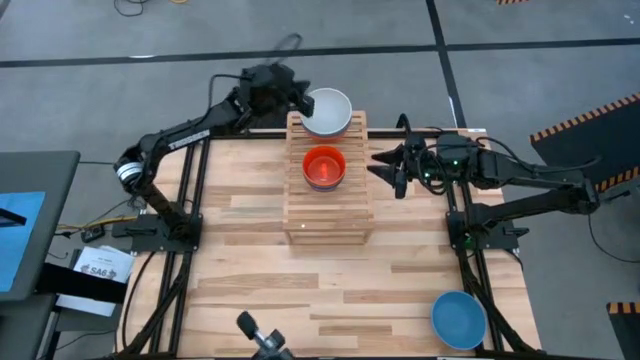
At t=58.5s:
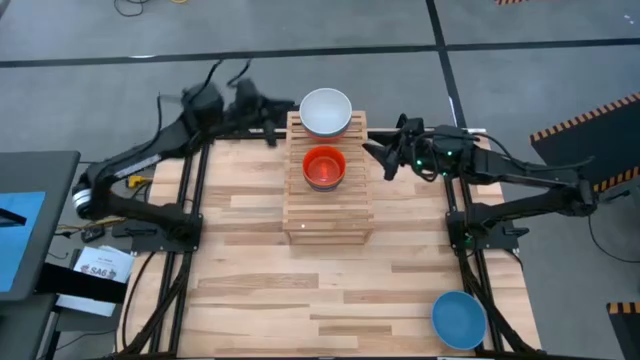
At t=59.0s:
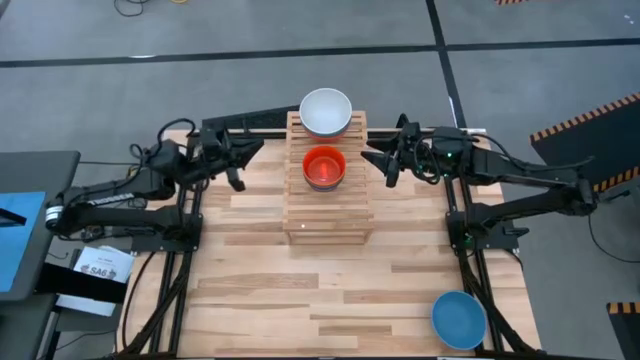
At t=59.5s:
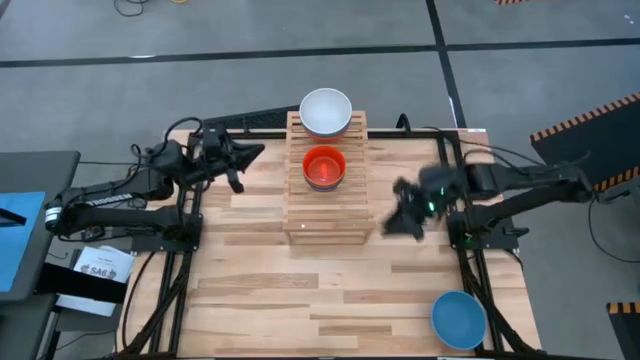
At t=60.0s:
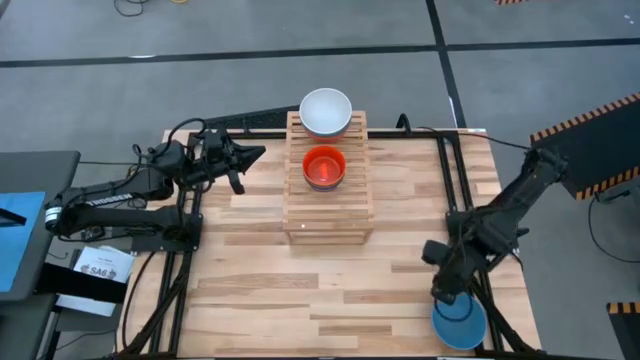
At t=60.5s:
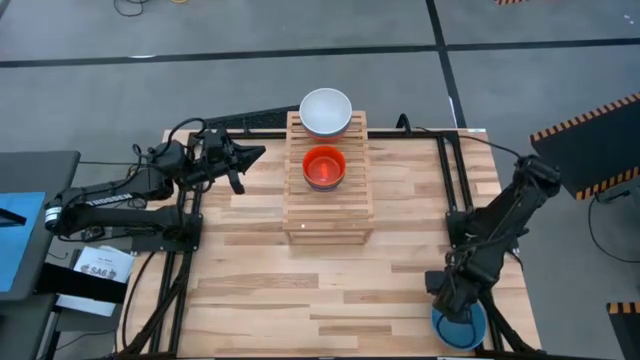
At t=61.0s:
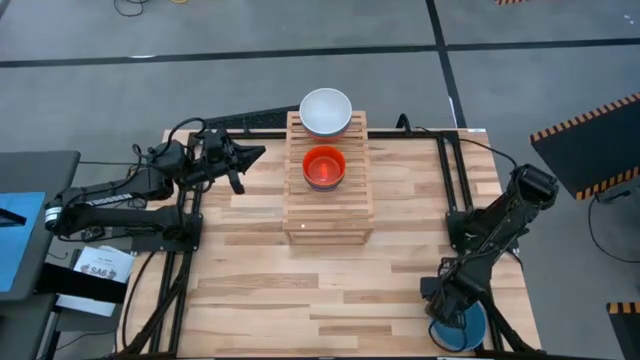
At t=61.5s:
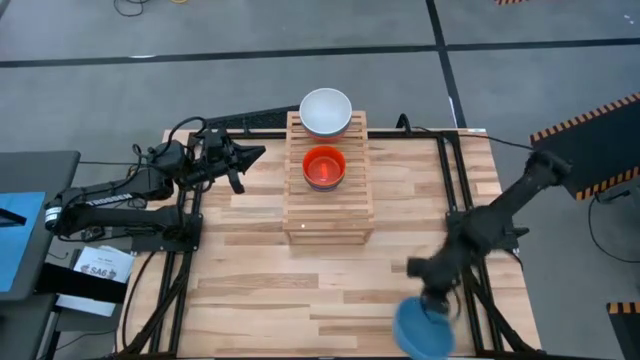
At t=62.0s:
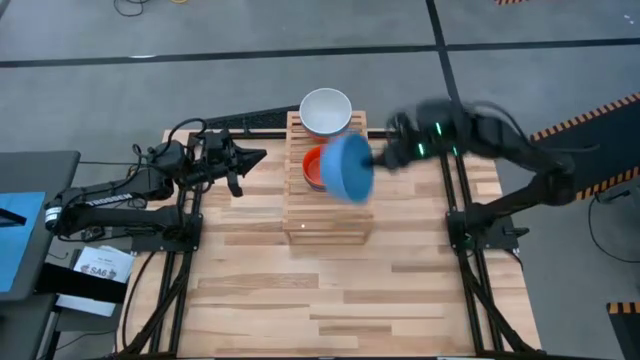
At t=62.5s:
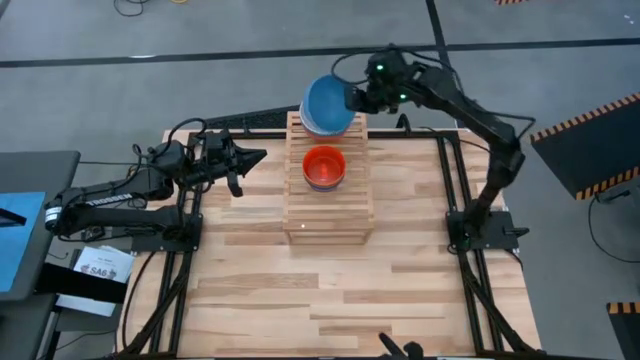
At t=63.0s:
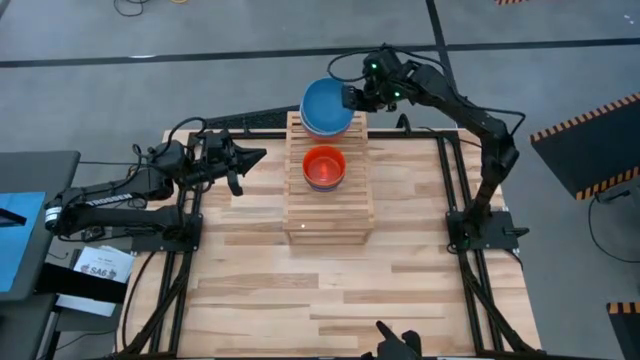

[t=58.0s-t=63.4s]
Task: Place and stack bowls onto a shelf
Stack the big blue bowl on top of the big white bowl on the shelf

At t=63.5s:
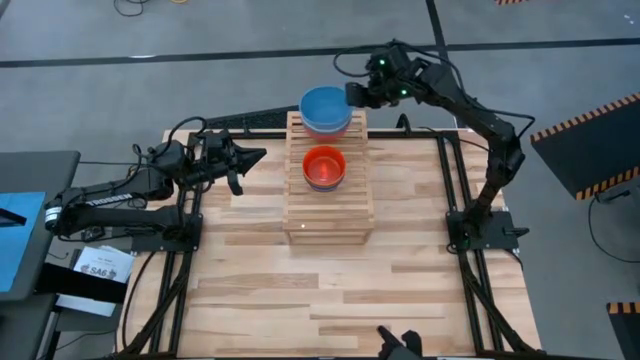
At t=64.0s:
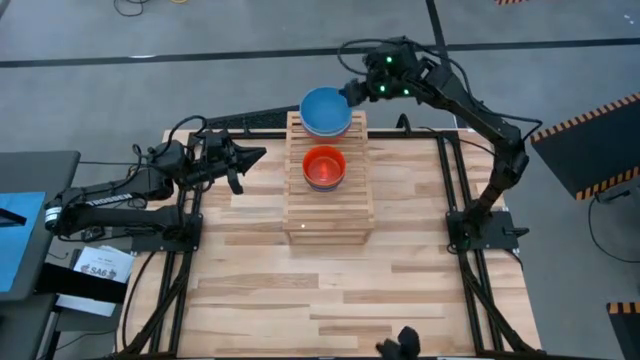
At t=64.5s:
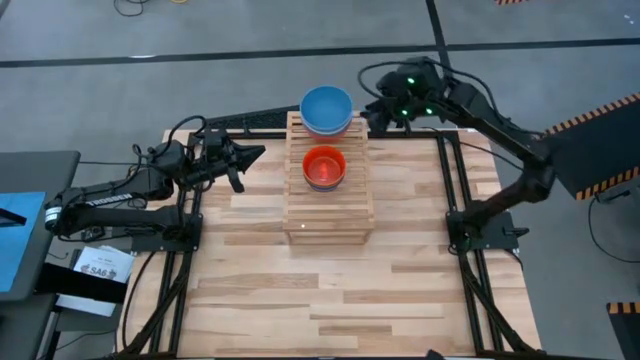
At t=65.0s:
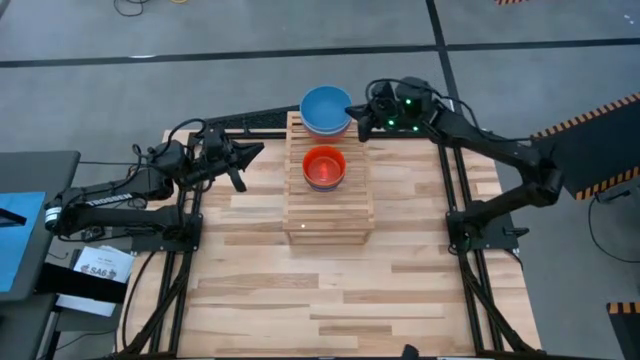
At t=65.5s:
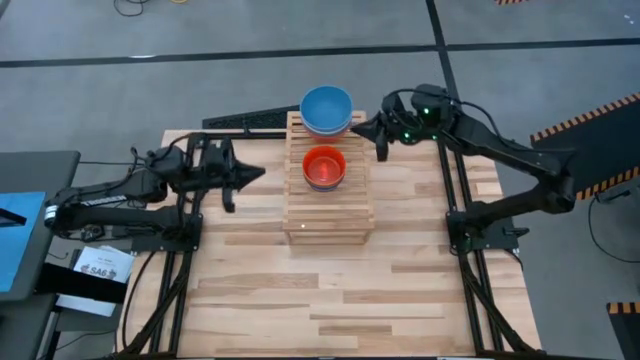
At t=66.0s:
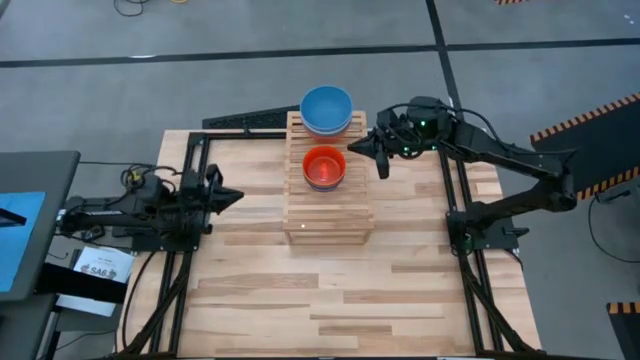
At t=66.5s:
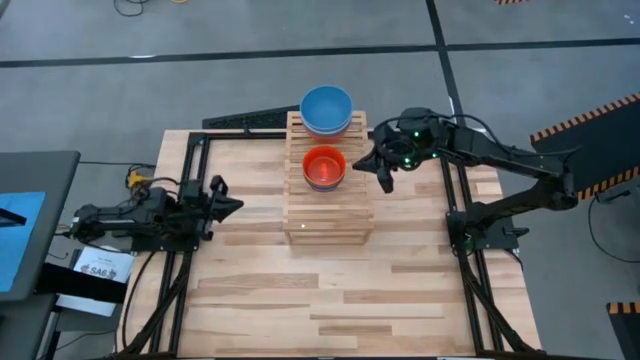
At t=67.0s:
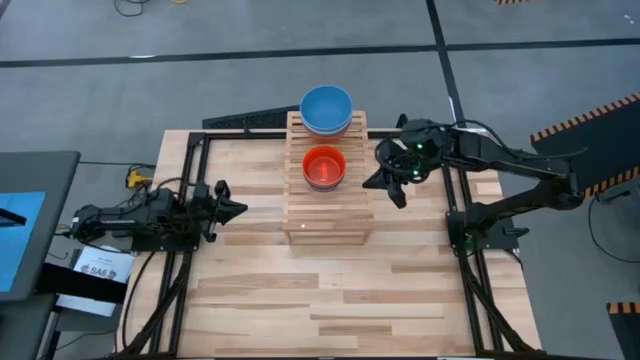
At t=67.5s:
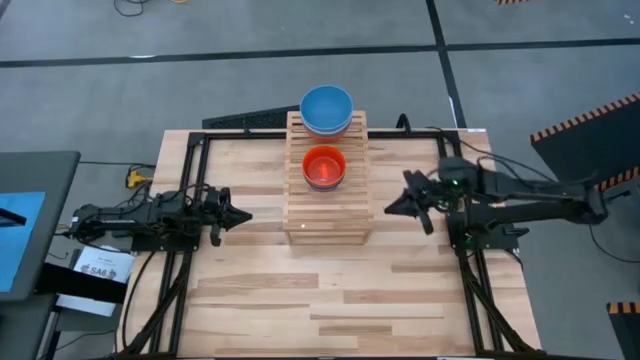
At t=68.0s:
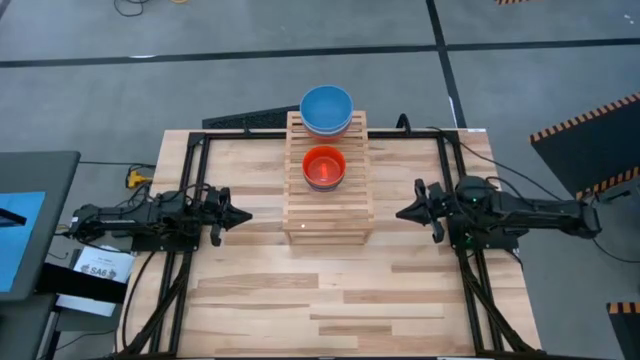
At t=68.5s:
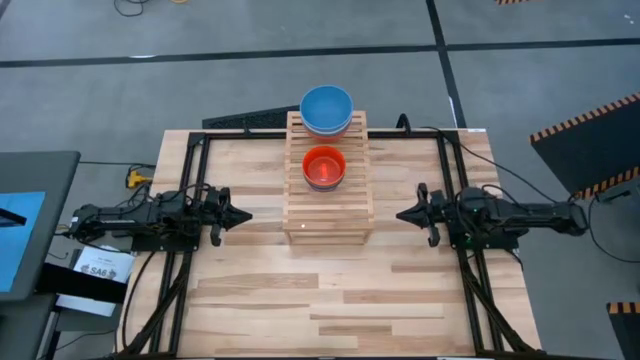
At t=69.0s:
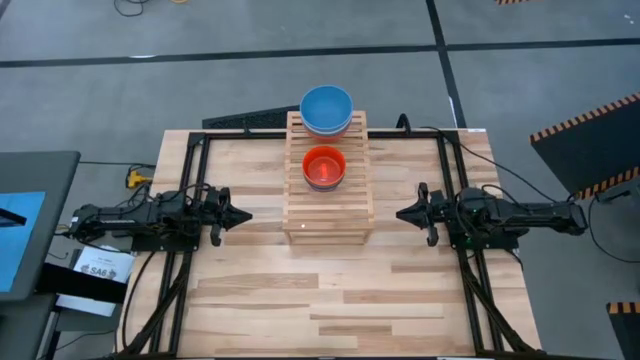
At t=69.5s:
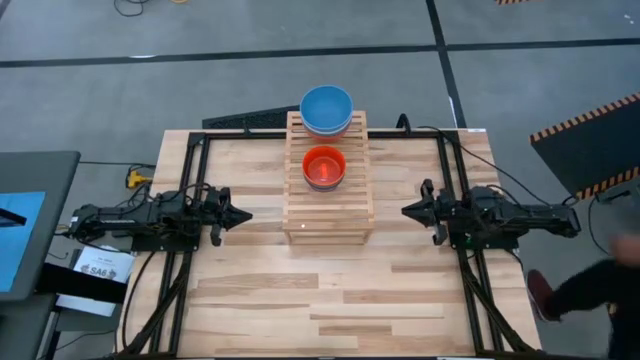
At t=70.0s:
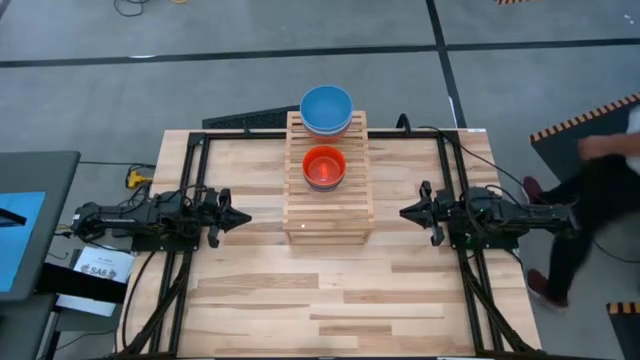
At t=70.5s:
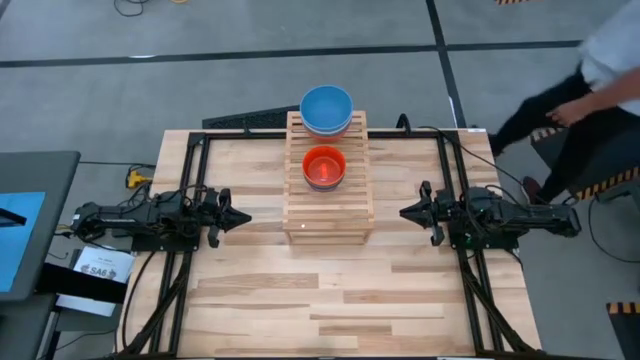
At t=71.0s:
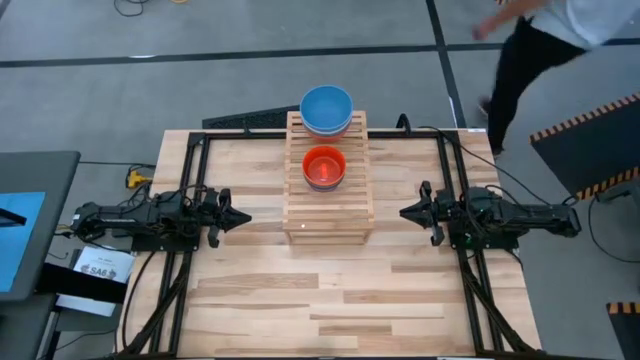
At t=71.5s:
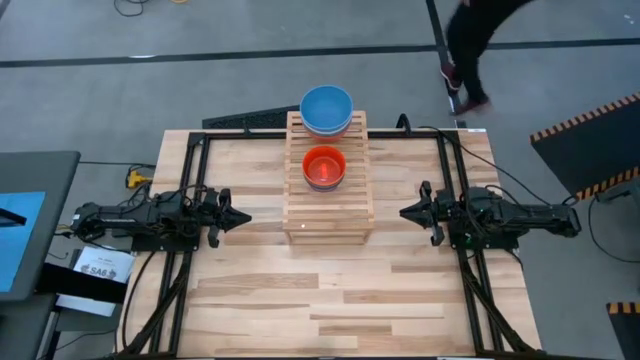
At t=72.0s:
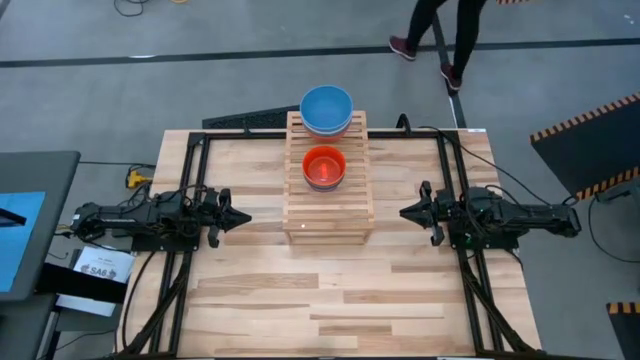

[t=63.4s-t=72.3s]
Return to Home Position

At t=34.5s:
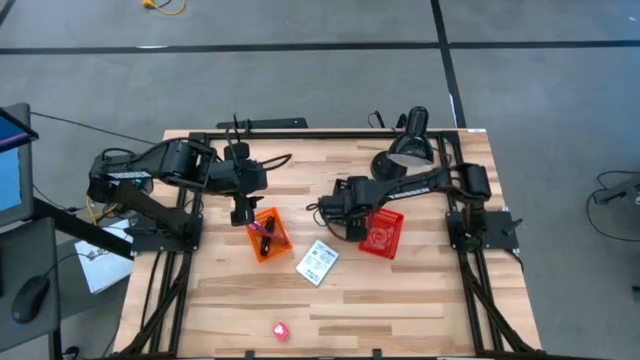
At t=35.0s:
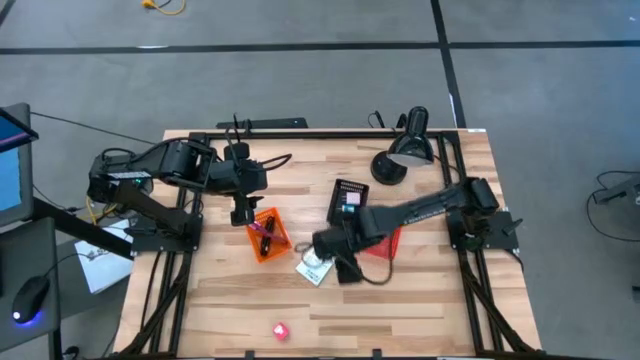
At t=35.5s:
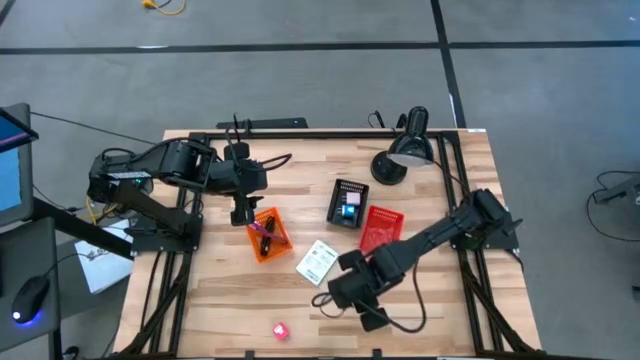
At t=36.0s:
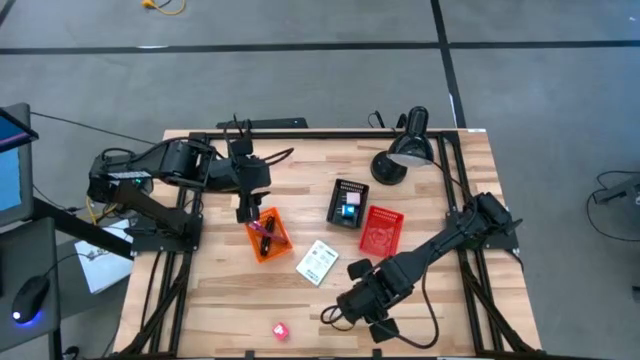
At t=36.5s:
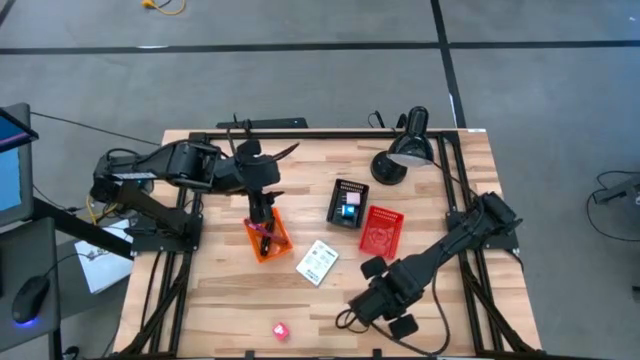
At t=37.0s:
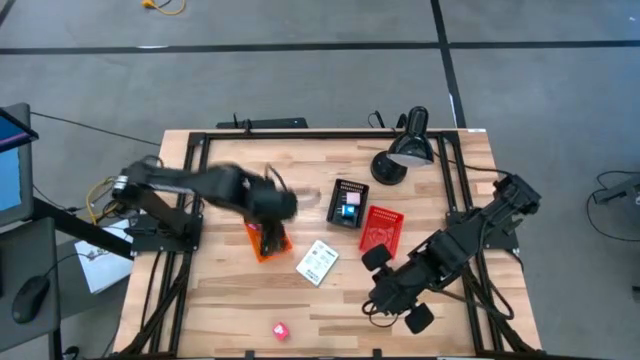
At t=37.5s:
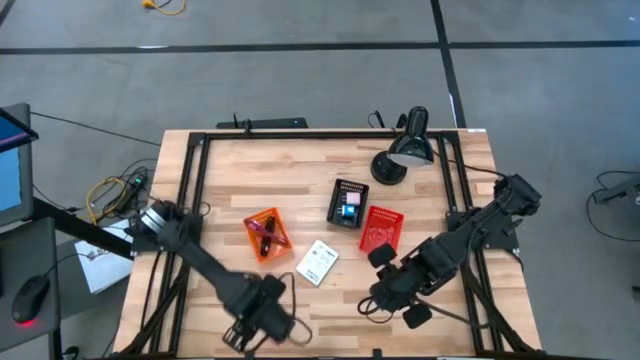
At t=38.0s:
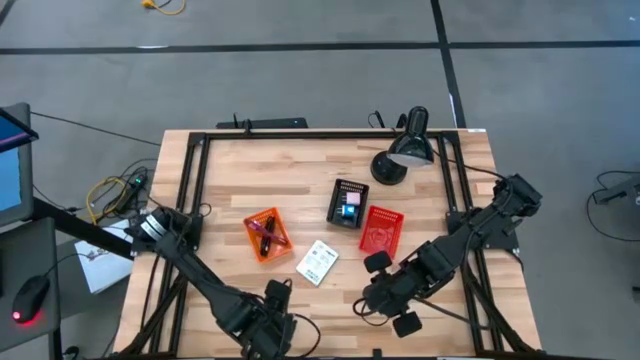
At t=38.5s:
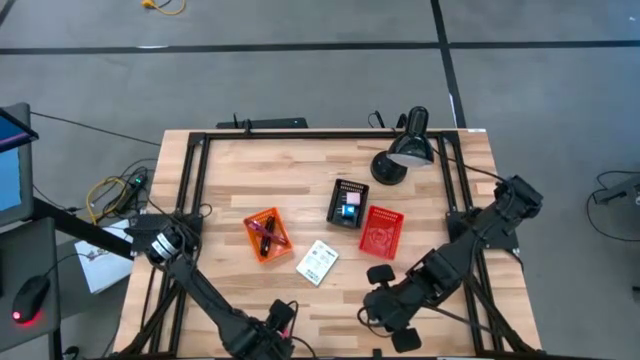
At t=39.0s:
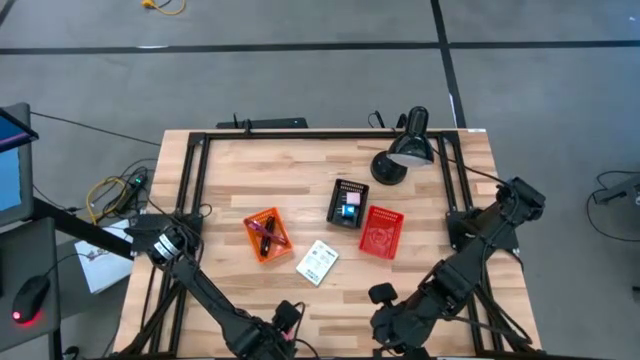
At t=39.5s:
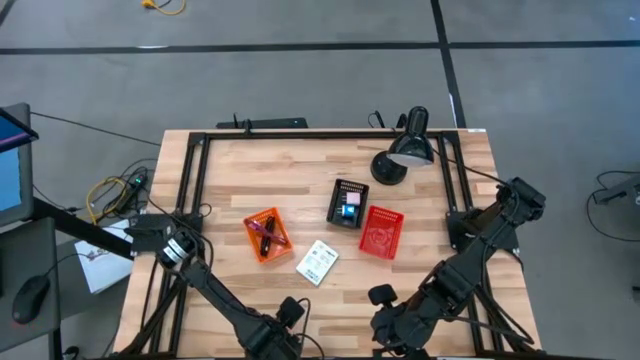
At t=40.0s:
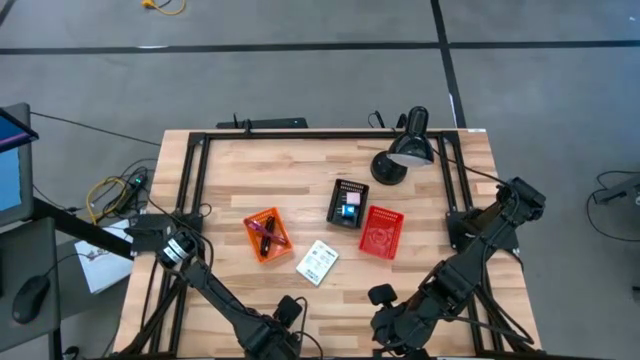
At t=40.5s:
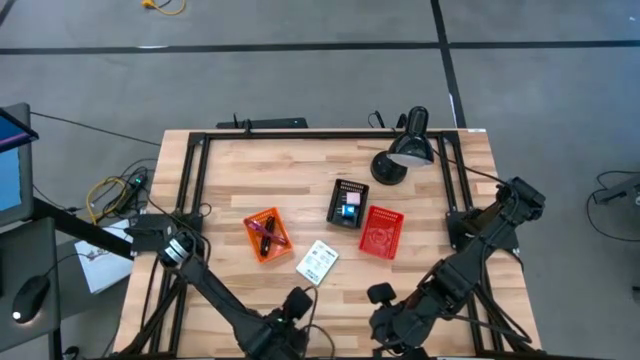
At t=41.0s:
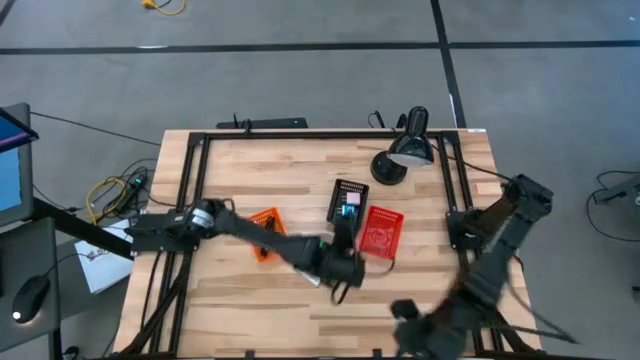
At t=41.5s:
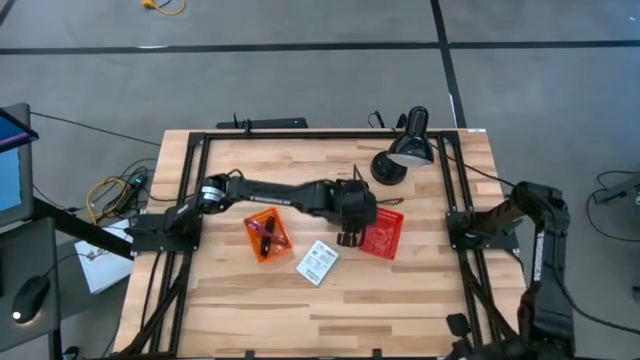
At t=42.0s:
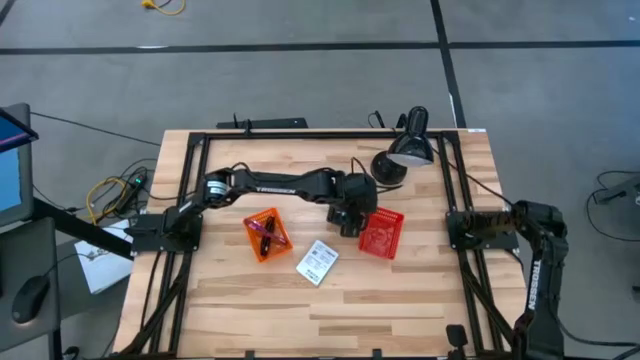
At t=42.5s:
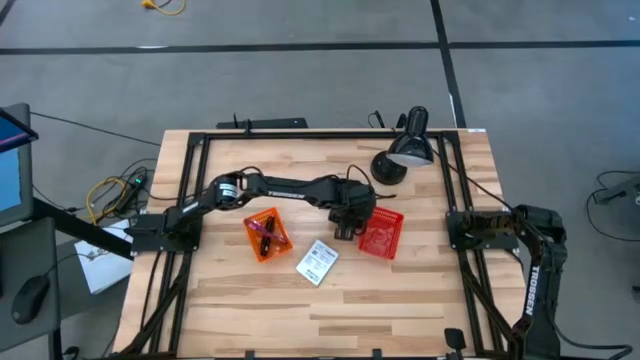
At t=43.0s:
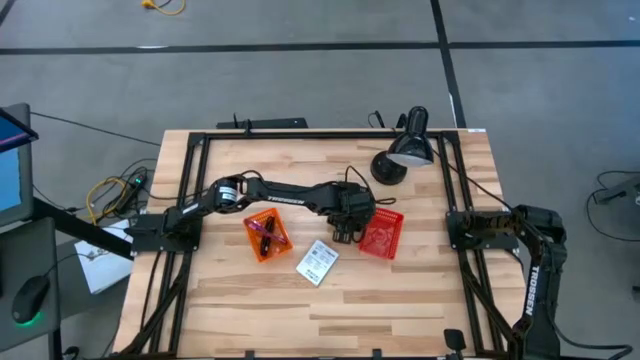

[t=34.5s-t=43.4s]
Task: Pick and place items into bin
Put the red charger adapter into the black bin
